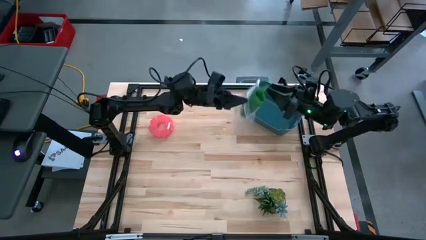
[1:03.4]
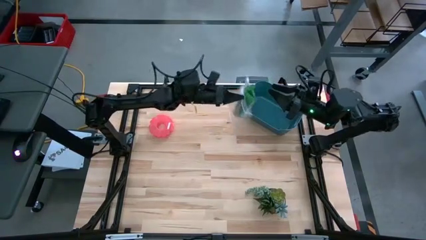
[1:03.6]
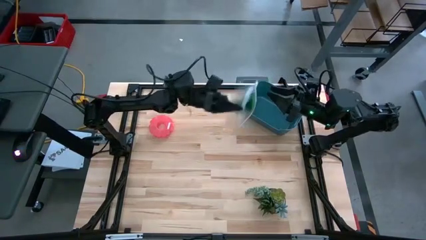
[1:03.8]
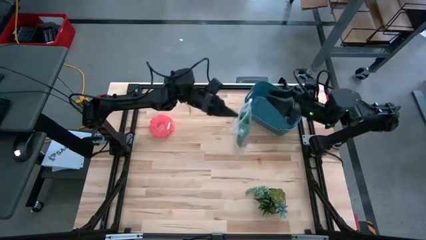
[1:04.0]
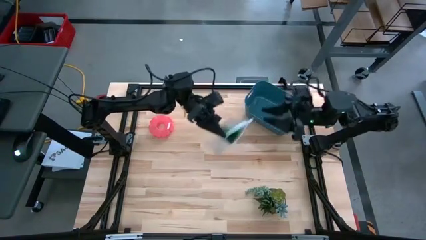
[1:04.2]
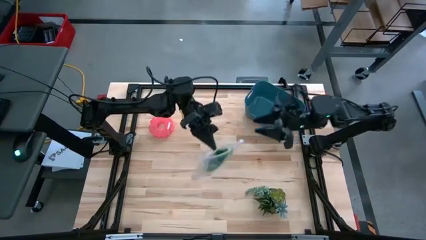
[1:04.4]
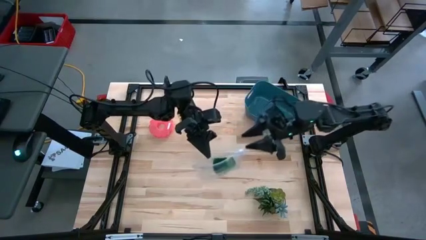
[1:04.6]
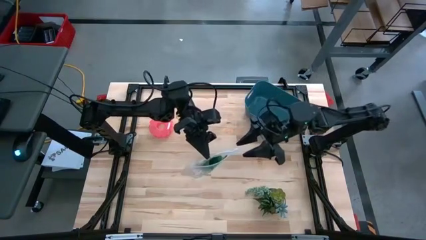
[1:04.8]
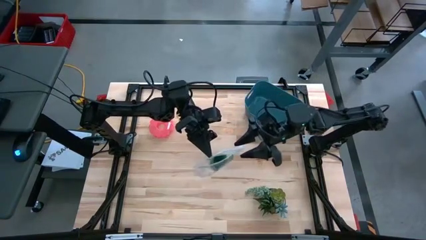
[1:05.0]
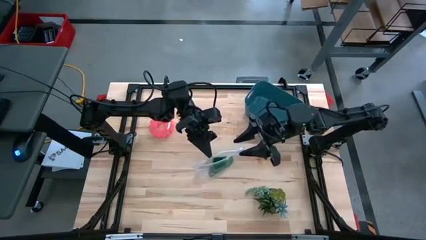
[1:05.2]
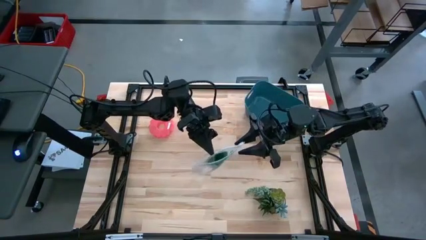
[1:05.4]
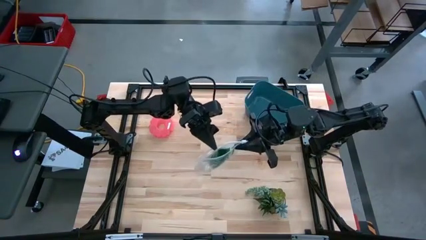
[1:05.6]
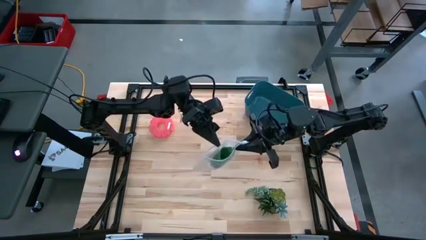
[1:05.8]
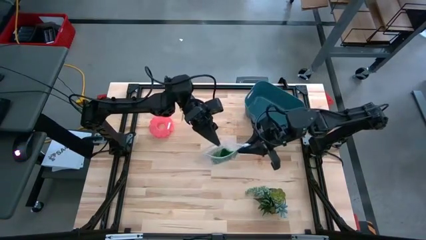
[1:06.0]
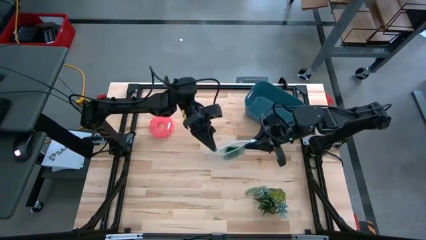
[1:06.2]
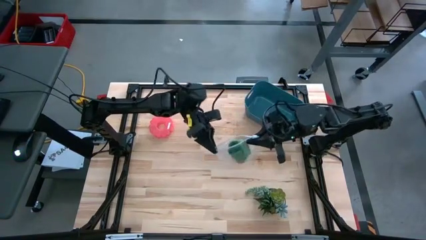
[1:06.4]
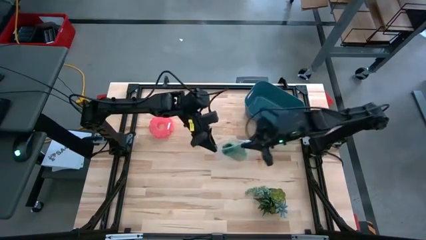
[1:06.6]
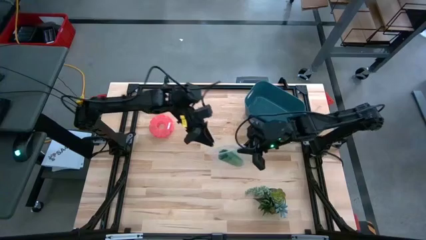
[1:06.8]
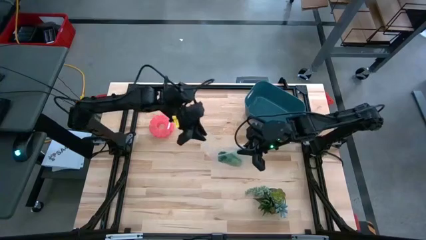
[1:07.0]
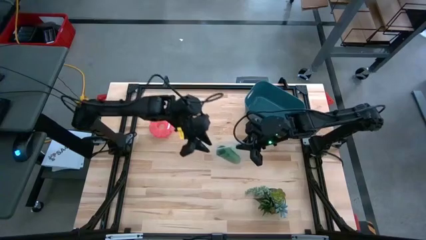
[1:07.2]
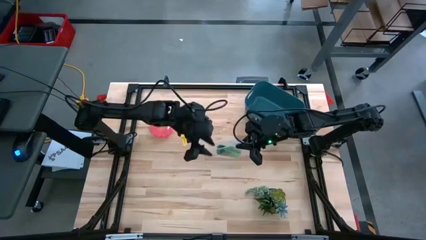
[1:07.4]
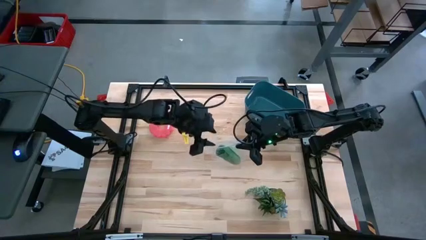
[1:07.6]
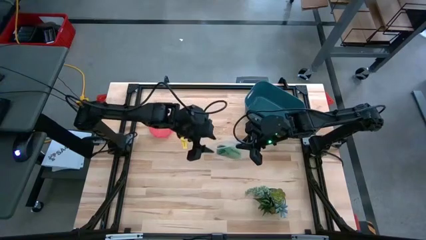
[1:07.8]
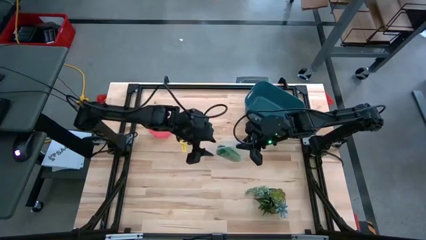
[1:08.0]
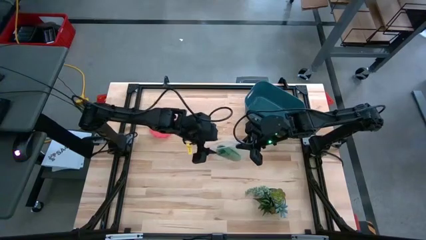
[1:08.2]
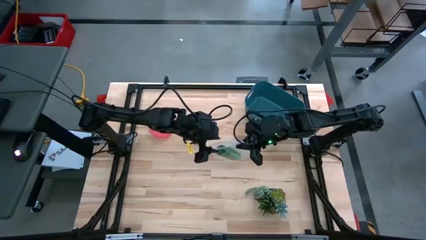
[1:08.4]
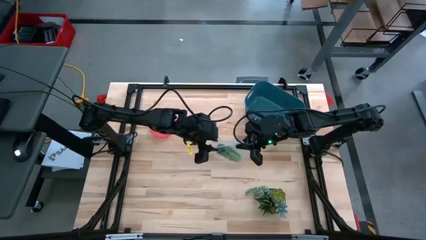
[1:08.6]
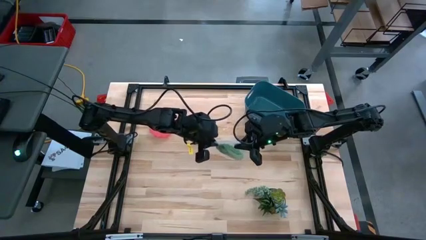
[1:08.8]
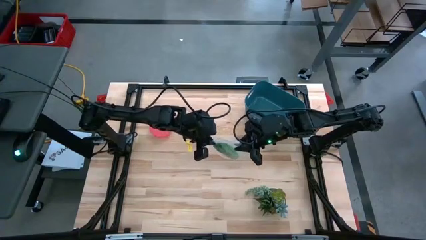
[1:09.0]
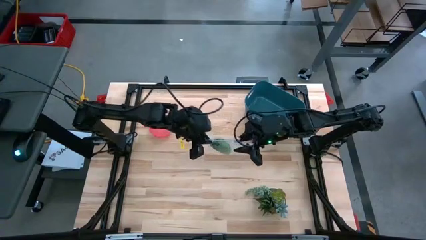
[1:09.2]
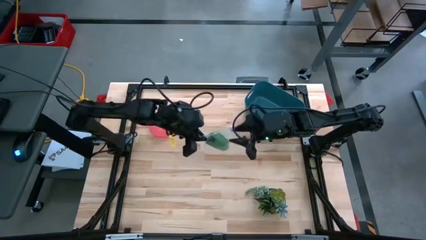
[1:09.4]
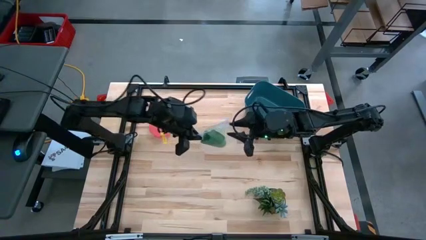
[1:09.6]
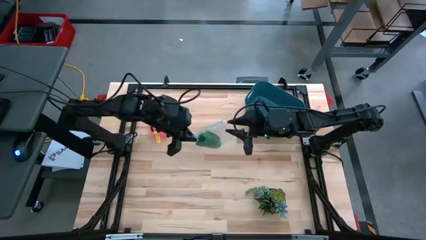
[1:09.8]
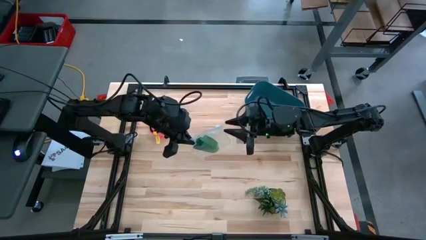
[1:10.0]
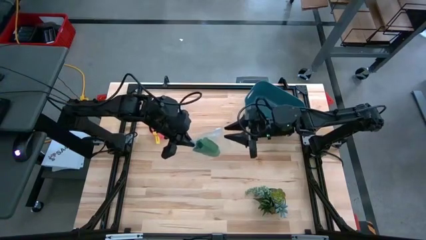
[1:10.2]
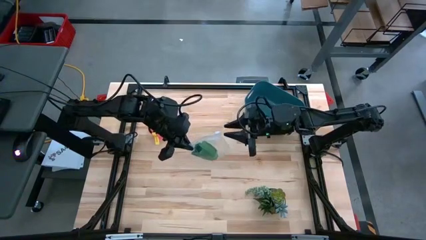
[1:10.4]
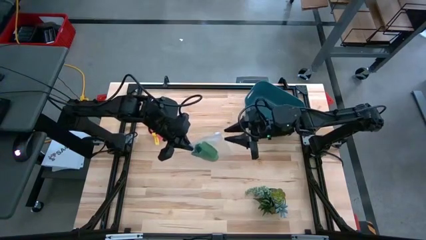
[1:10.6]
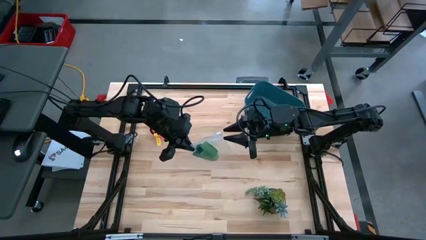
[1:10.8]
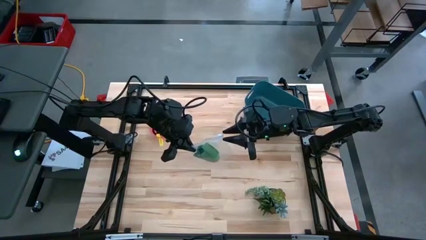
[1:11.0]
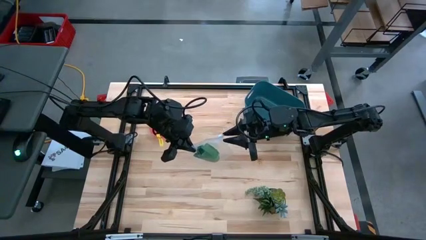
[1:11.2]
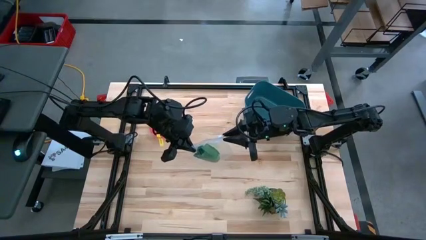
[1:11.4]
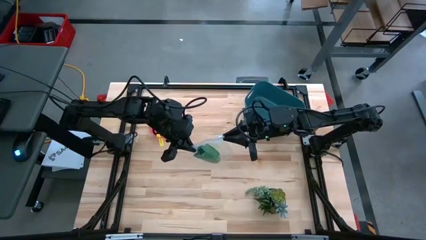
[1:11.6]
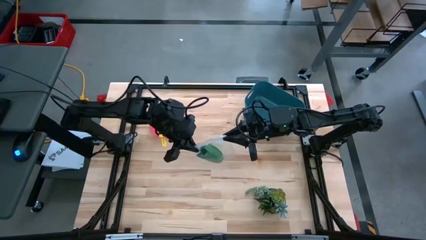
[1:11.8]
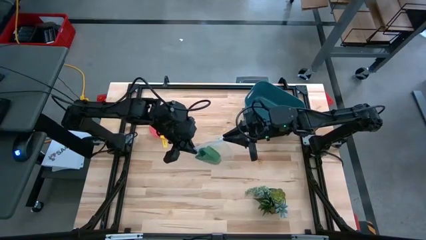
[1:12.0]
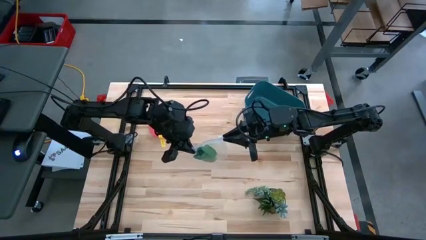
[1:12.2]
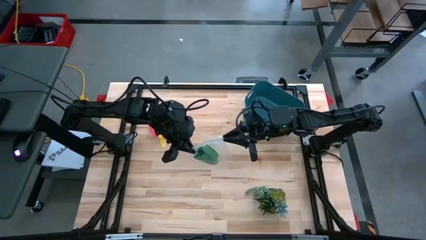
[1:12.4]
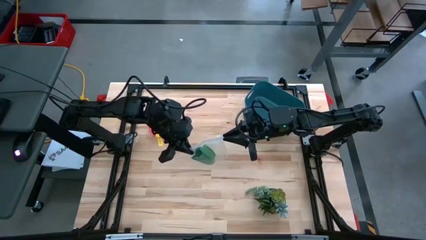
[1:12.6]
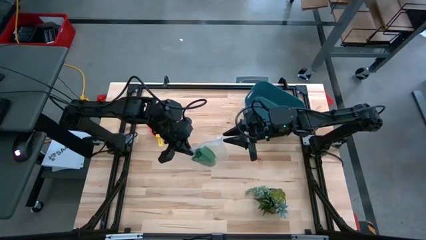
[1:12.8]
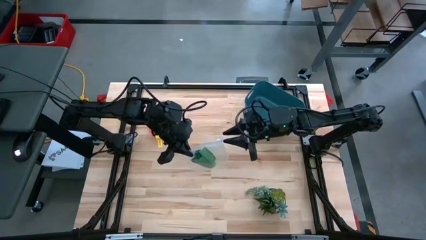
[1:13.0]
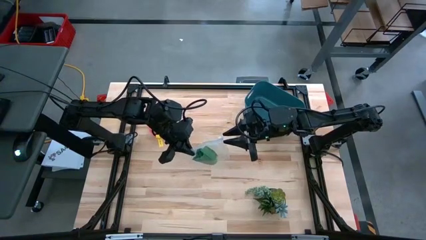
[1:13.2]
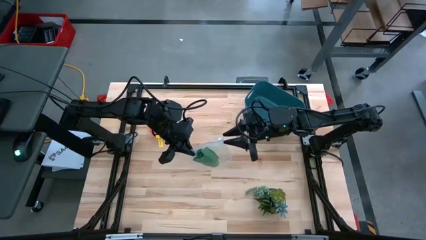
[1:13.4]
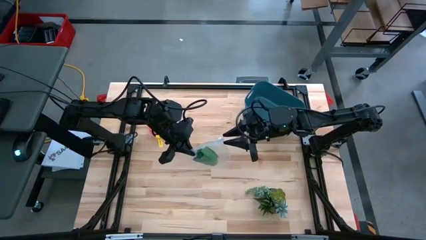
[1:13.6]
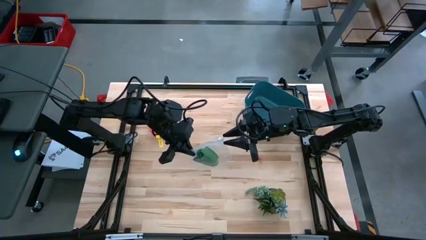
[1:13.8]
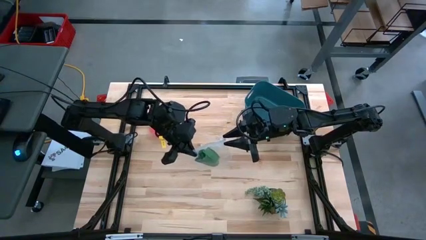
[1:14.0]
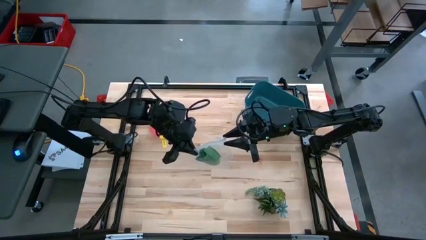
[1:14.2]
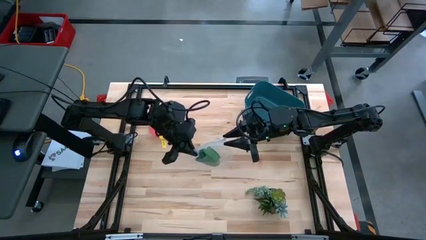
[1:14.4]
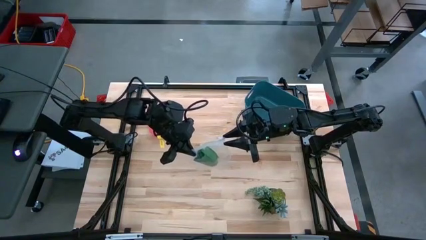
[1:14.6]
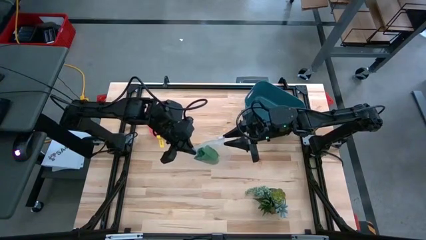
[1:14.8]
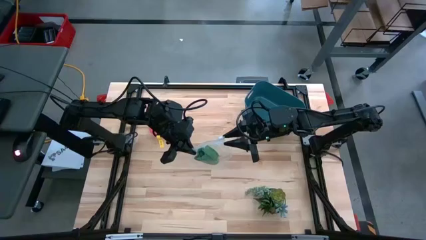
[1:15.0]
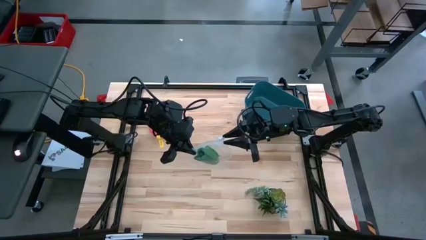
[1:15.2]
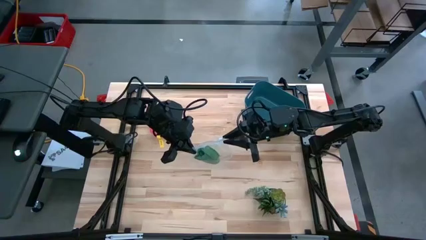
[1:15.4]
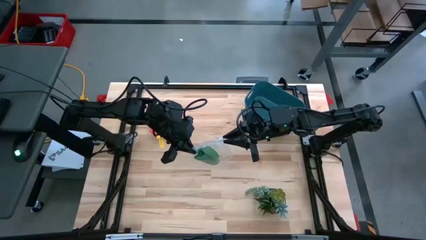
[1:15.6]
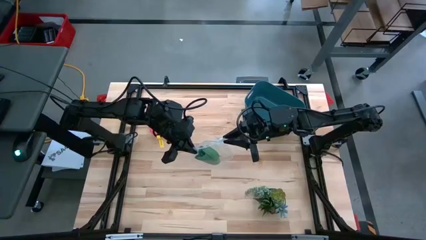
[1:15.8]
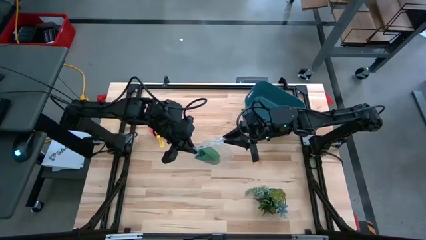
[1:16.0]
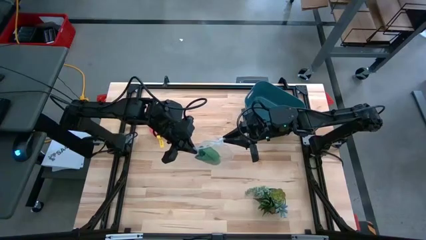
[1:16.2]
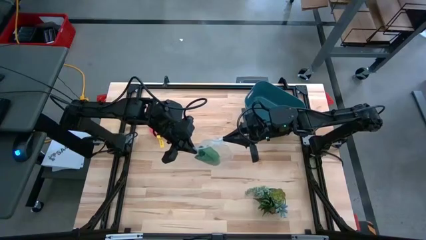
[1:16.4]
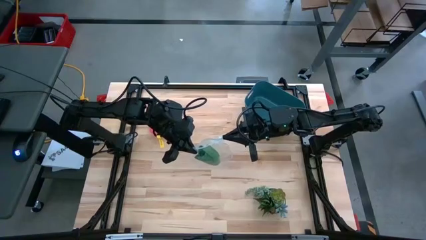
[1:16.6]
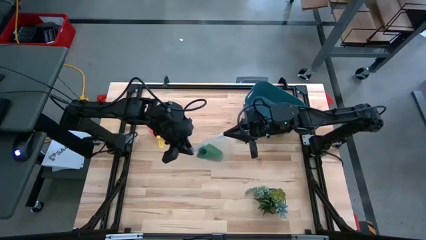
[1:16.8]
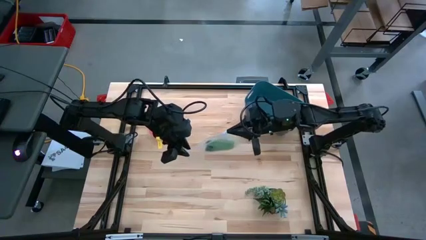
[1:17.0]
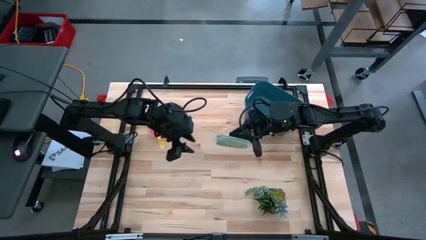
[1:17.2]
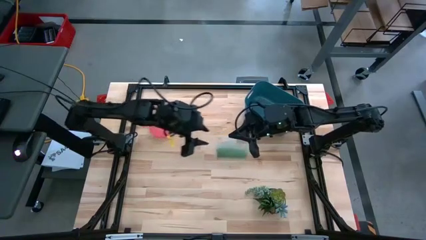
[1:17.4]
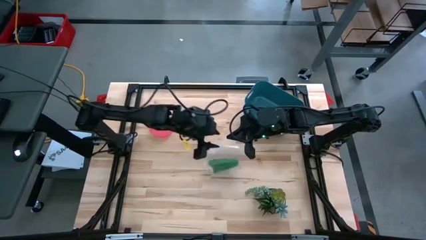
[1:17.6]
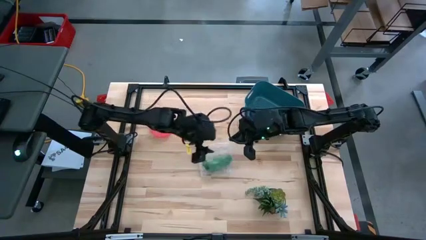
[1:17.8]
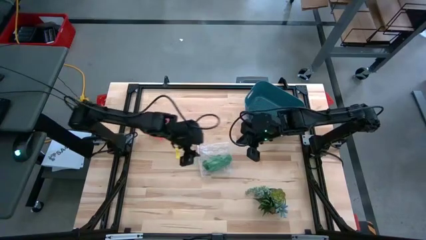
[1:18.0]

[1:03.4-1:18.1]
Task: Roll bandage
Close the transparent zip bag
